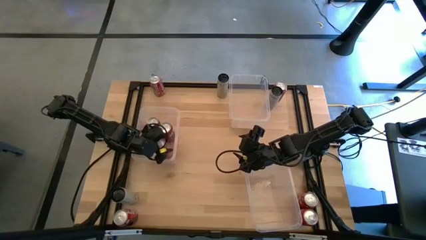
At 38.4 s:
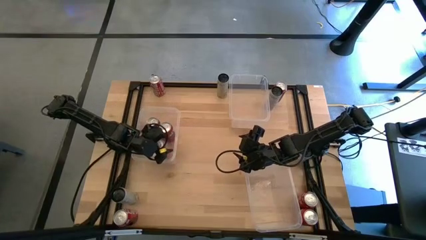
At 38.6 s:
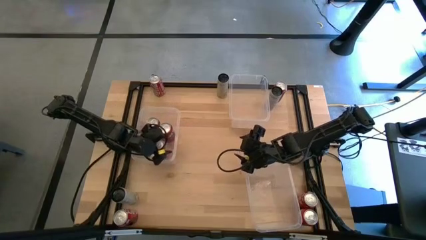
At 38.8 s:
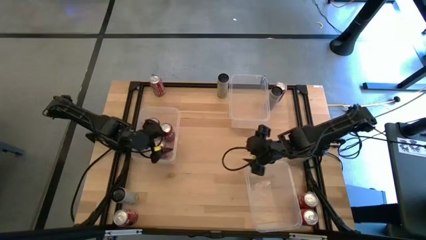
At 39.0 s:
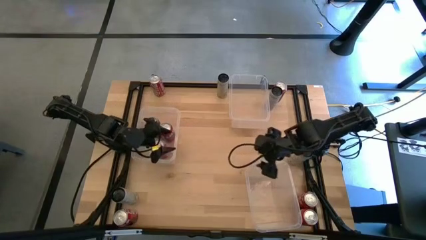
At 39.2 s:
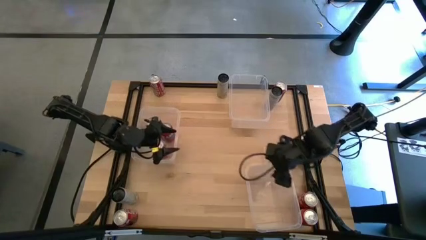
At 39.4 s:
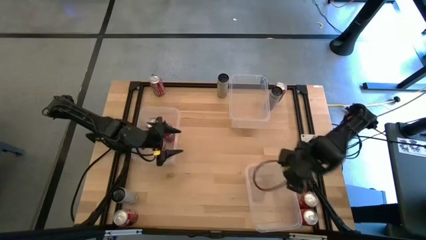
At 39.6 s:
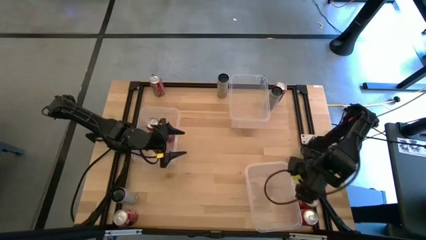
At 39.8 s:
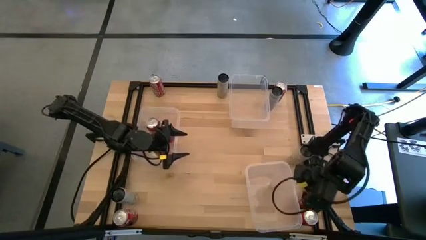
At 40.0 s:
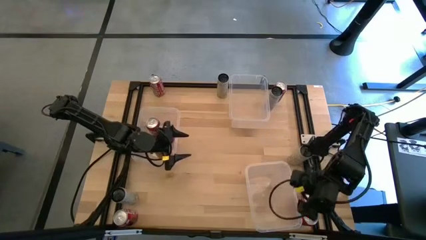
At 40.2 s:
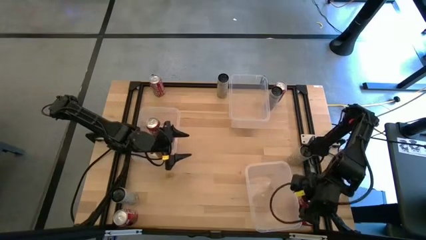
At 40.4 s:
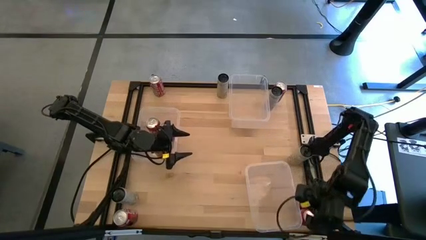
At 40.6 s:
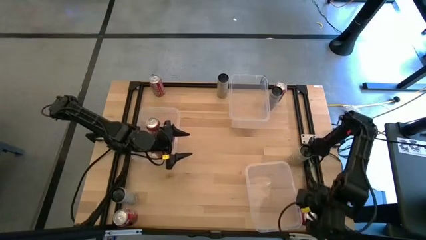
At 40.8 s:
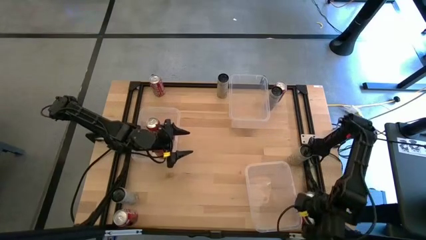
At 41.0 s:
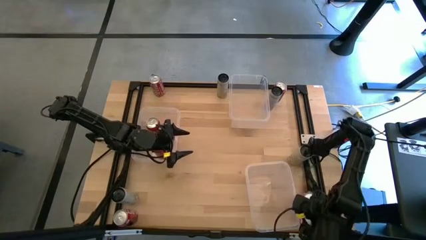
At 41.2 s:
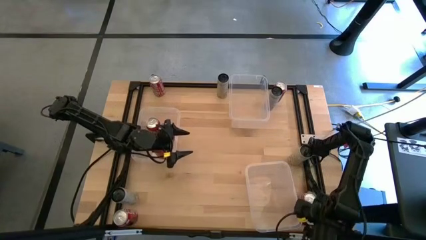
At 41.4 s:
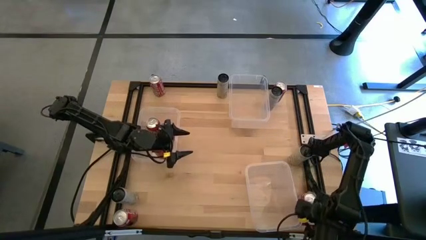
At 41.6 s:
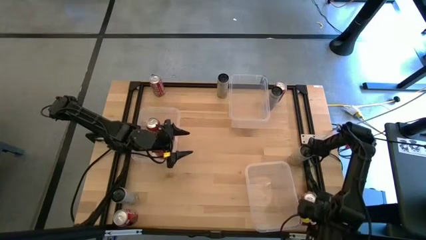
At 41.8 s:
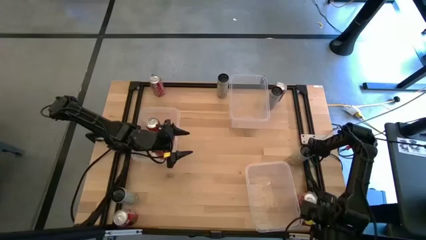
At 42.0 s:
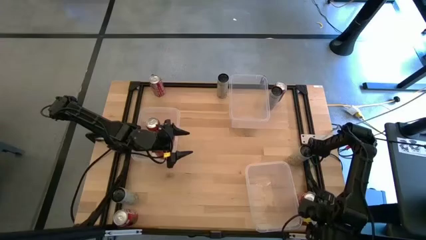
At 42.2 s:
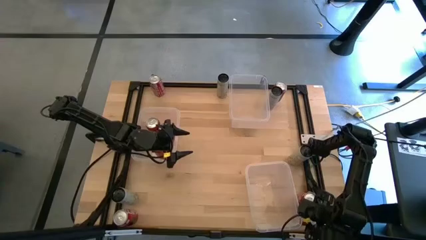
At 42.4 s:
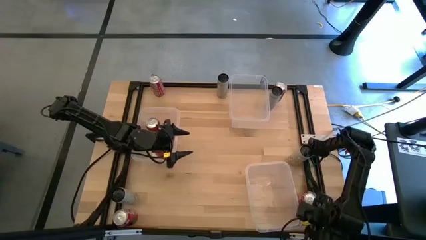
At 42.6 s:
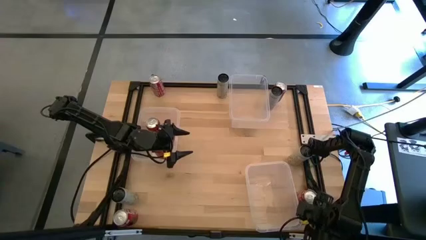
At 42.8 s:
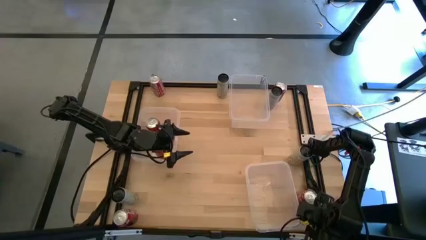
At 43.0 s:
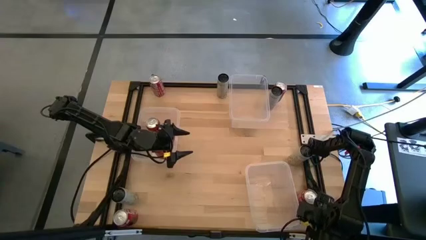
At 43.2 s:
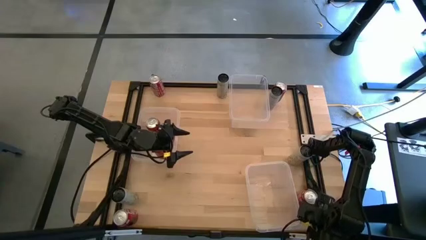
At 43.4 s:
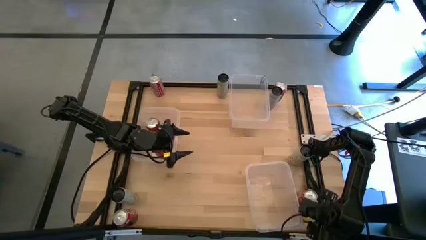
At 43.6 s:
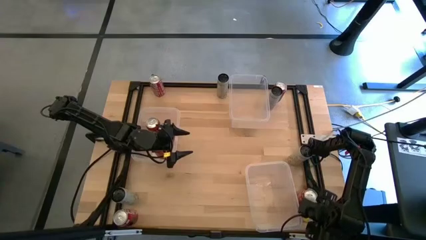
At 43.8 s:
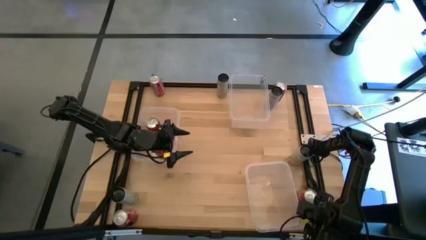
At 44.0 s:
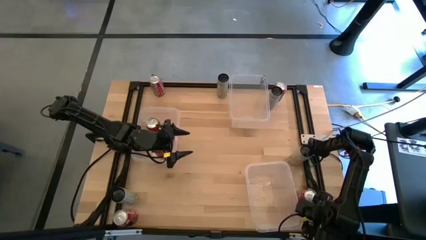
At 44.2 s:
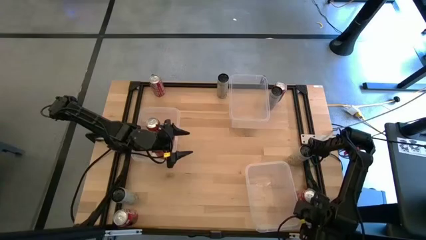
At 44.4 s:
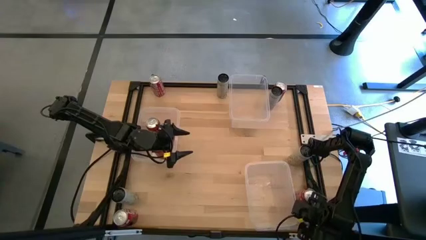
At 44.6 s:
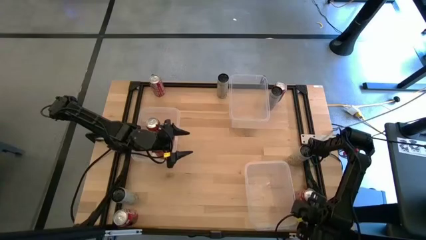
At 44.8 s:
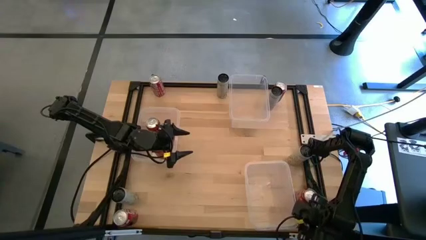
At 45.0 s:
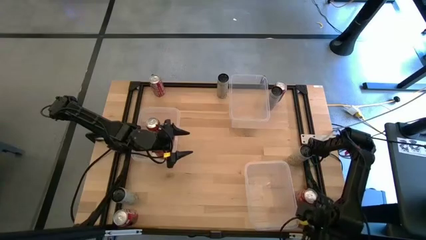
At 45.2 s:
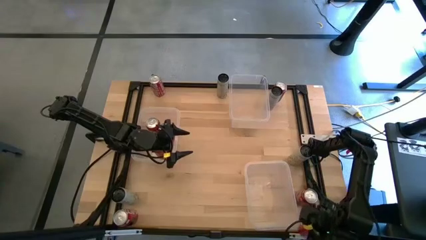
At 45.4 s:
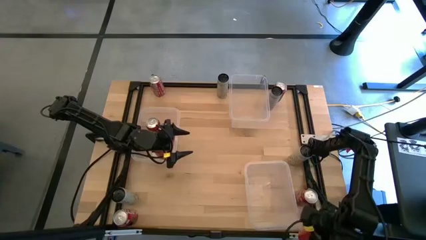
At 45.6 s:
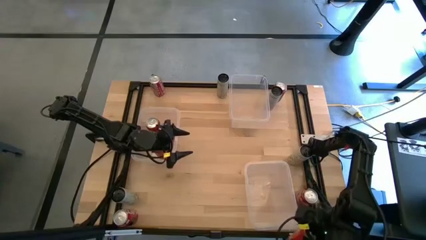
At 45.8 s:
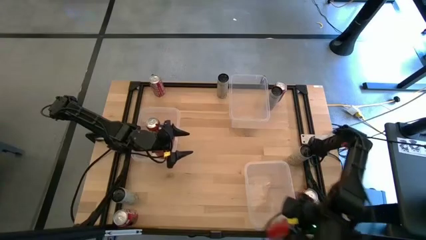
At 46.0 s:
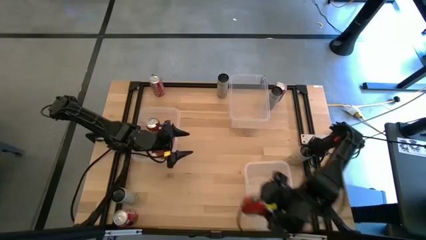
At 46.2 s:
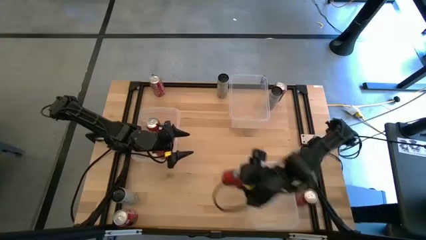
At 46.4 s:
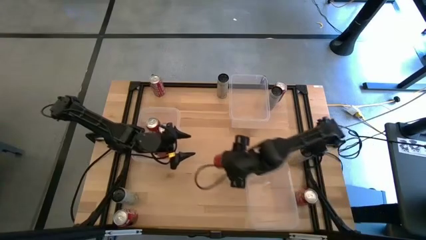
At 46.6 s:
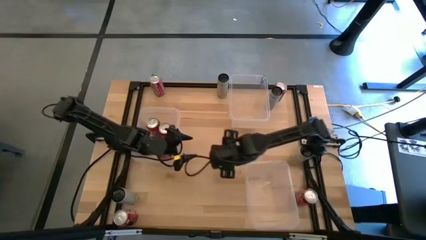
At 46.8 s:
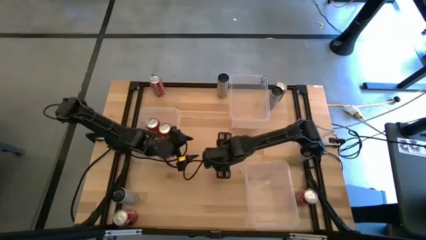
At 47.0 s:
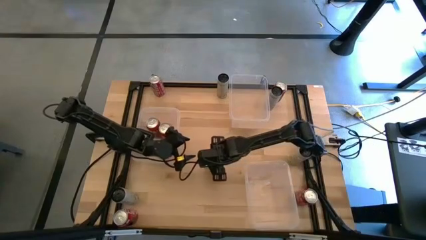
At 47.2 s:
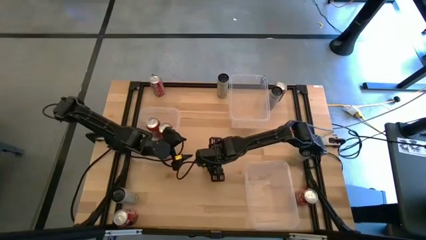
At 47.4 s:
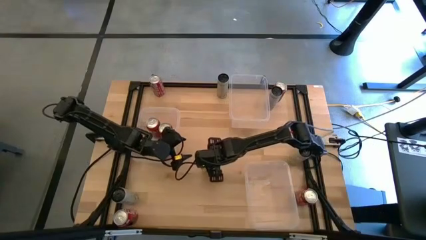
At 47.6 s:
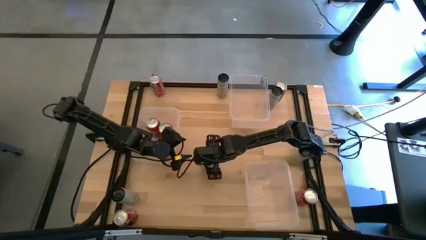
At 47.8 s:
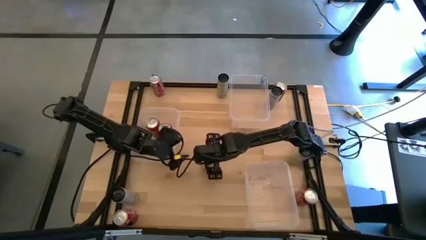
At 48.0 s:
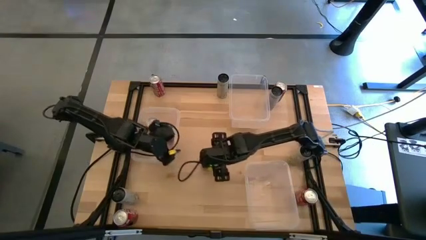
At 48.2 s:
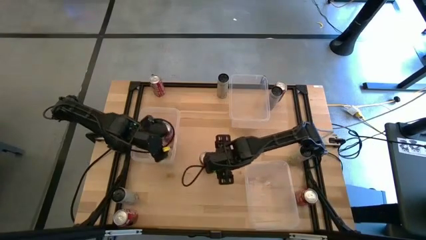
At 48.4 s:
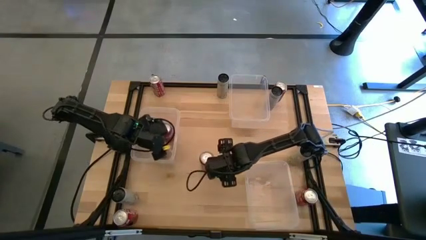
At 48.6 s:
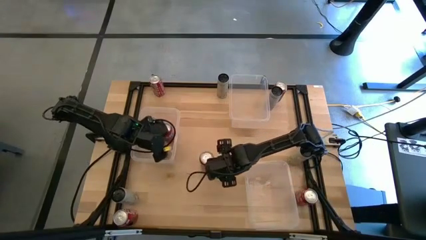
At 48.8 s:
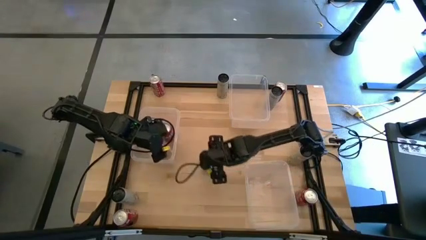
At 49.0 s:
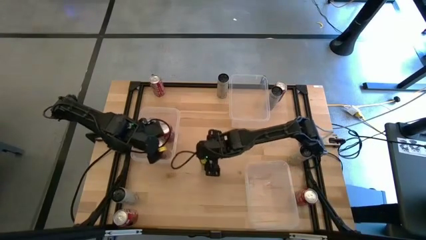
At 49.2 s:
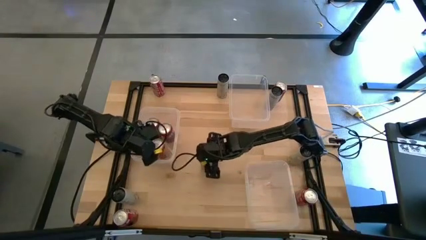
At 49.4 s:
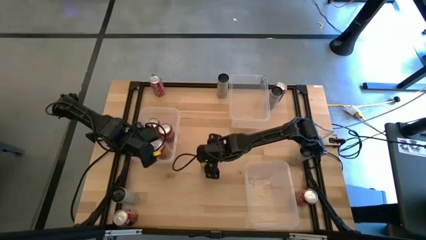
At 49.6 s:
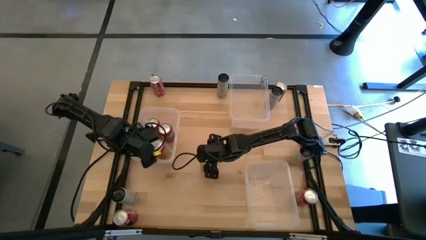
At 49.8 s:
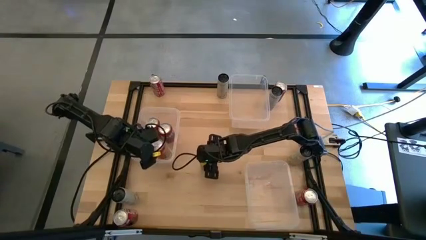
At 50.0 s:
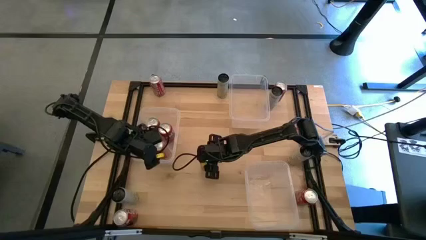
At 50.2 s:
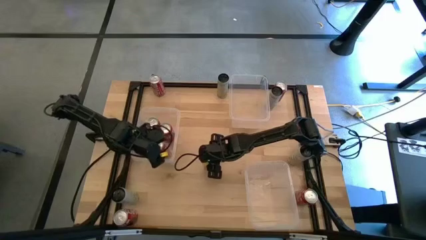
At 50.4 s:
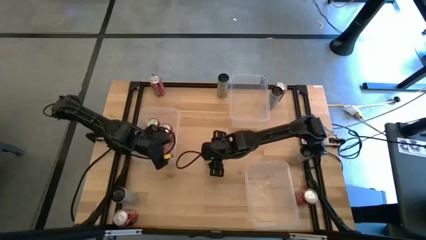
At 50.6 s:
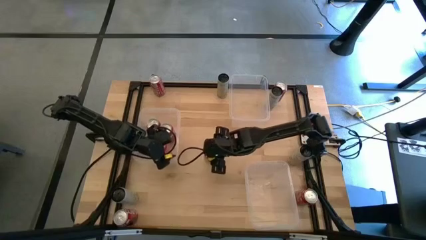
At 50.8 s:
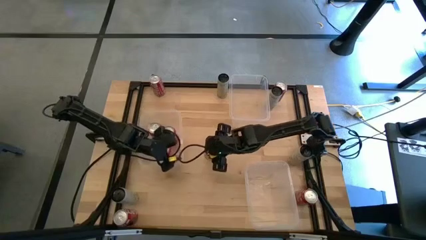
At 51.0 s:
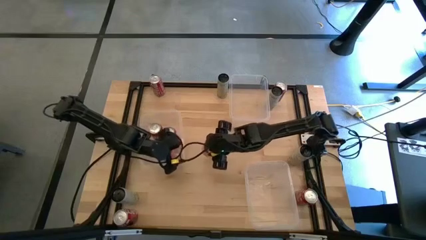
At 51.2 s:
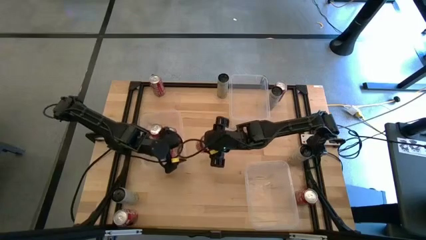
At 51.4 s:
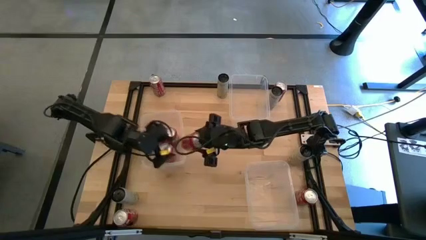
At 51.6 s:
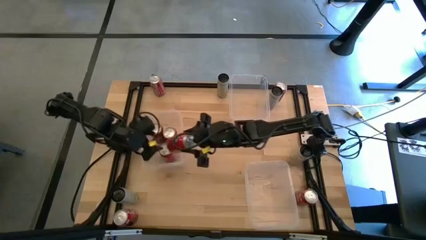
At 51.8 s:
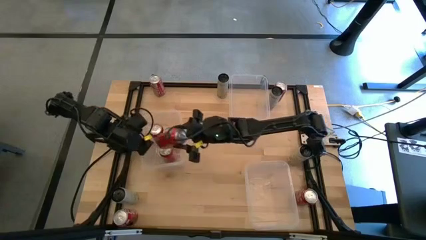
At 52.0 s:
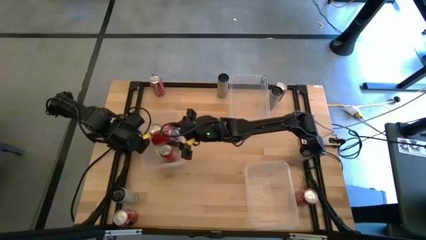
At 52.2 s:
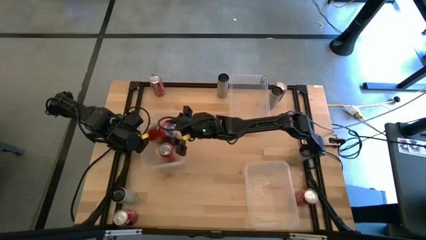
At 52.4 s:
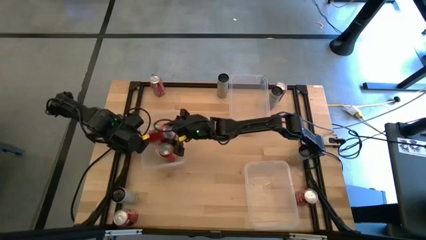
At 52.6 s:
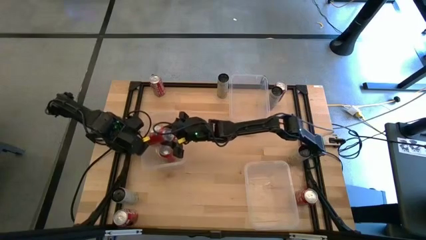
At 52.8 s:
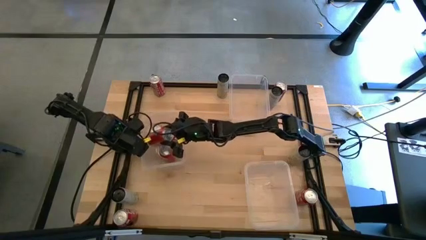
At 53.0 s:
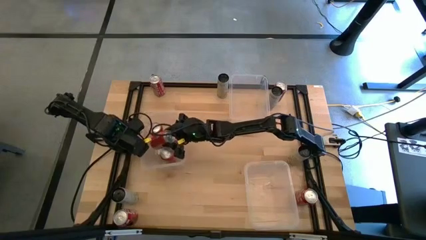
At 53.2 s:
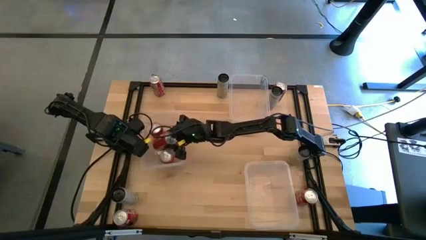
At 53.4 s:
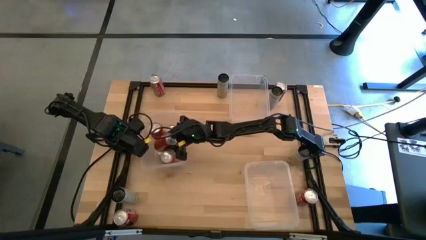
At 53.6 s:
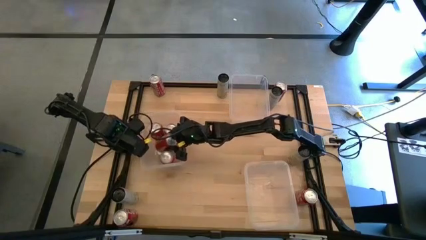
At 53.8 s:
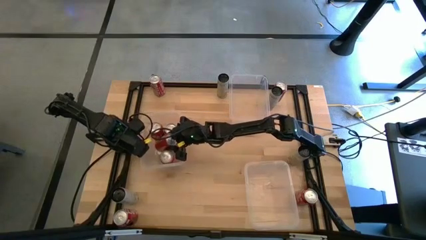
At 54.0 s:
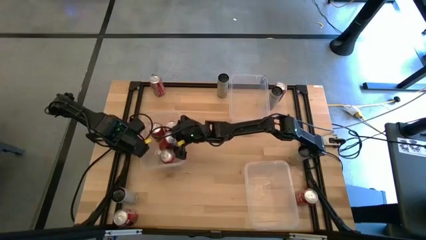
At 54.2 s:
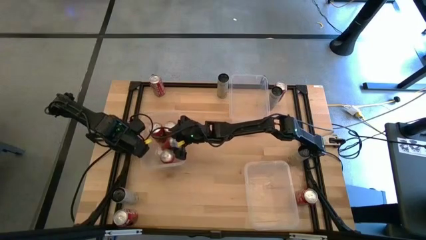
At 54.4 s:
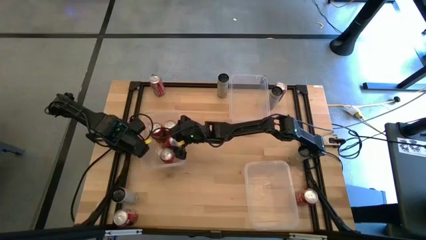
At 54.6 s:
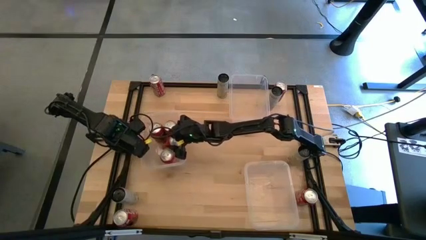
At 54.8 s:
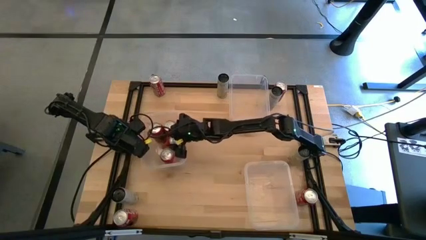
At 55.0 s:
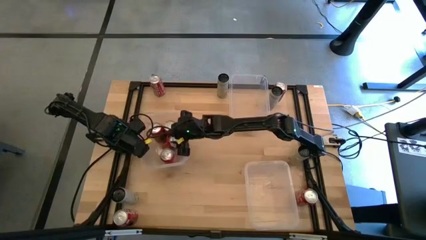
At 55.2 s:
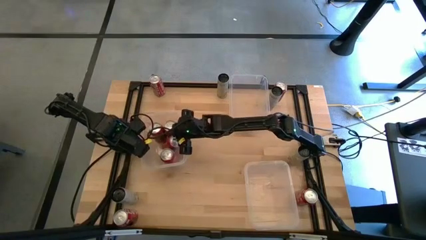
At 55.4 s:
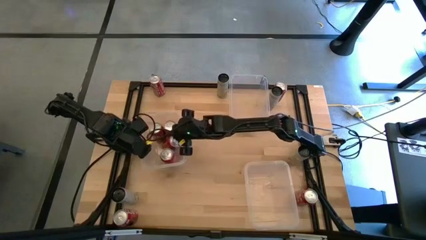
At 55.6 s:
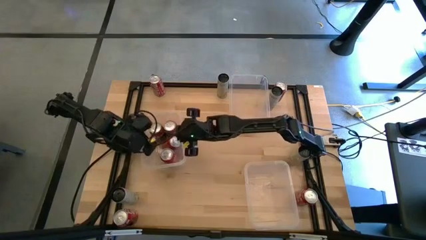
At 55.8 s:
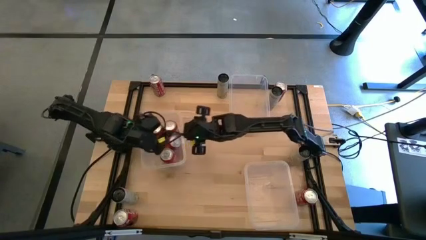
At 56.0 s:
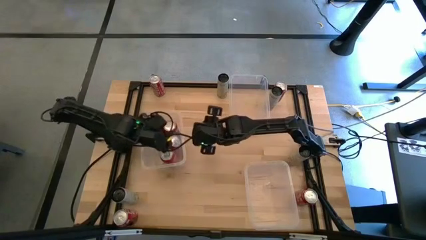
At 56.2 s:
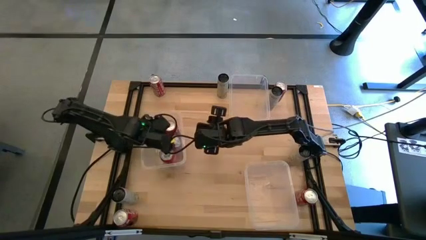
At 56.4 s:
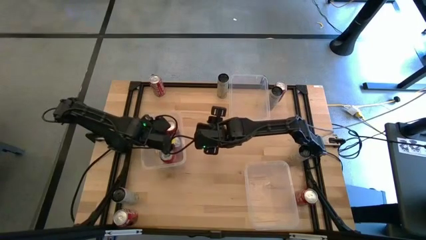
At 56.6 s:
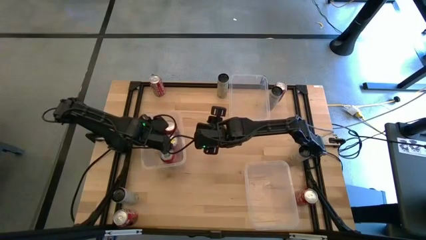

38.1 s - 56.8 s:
Task: Sort soda cans
Put the red soda can into the middle transparent bin
